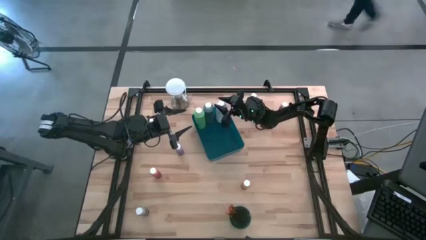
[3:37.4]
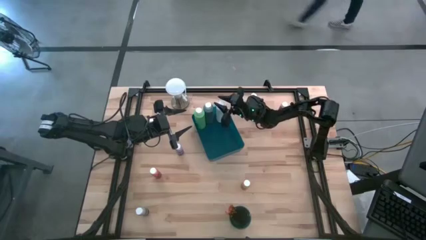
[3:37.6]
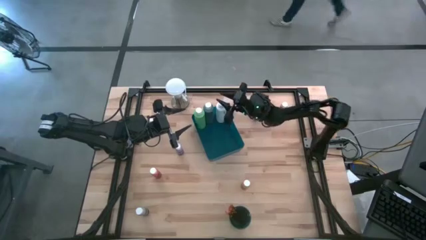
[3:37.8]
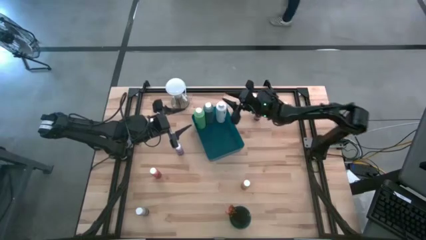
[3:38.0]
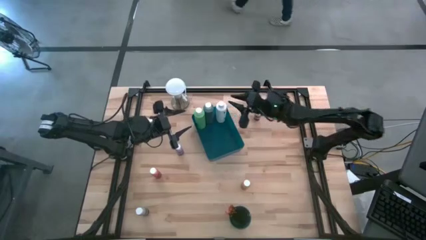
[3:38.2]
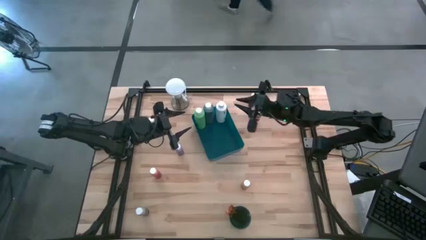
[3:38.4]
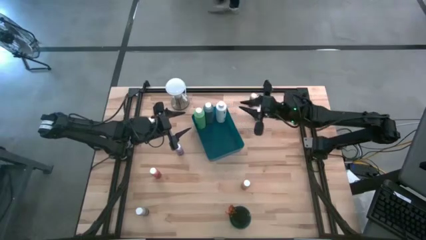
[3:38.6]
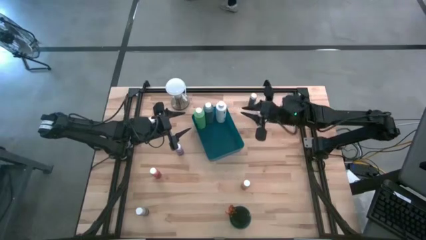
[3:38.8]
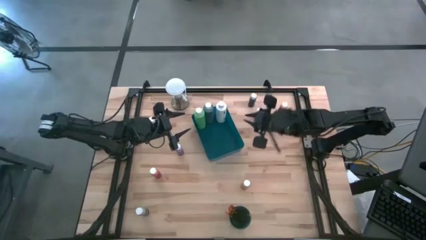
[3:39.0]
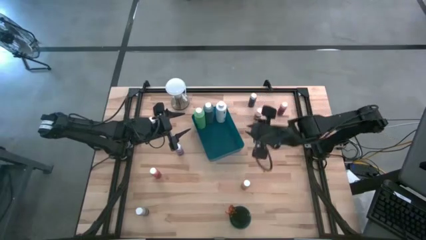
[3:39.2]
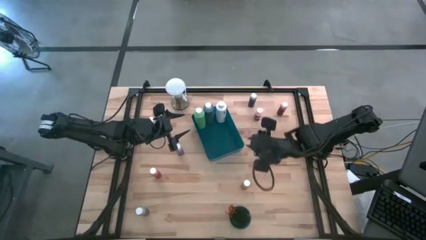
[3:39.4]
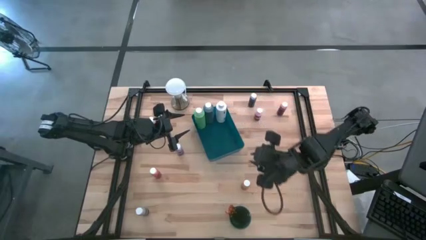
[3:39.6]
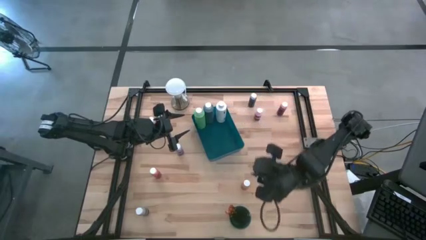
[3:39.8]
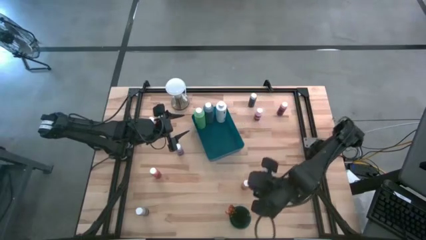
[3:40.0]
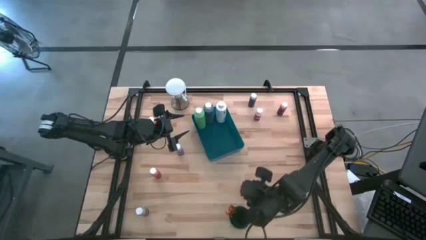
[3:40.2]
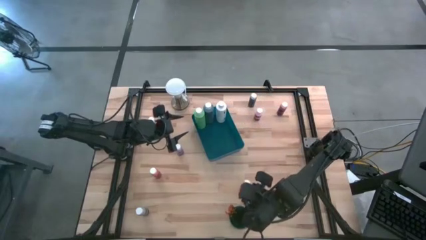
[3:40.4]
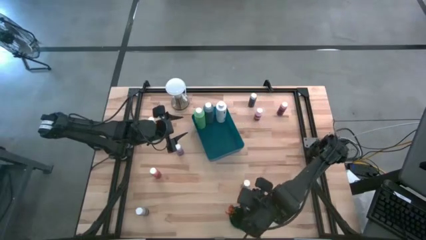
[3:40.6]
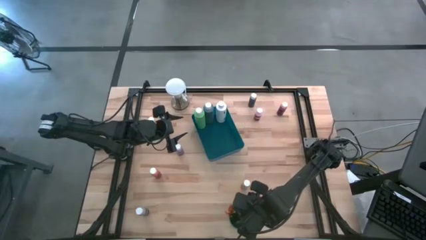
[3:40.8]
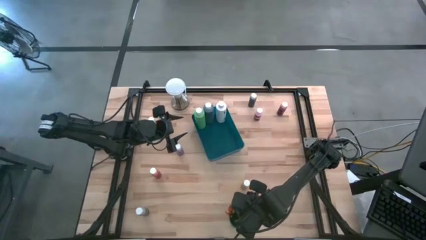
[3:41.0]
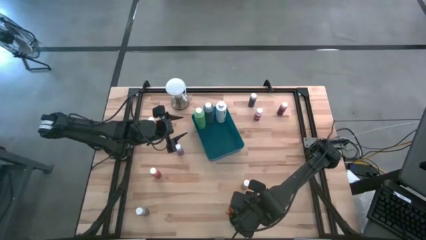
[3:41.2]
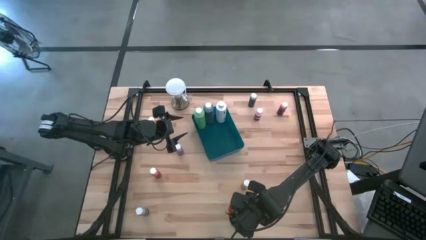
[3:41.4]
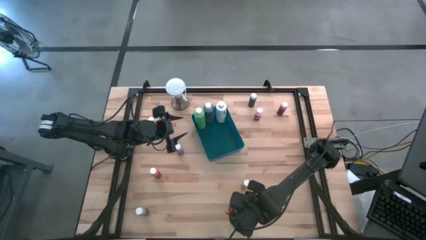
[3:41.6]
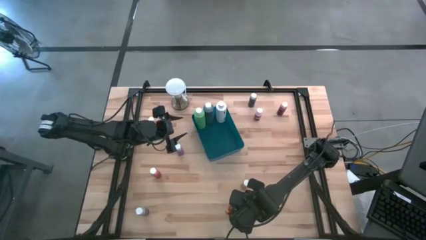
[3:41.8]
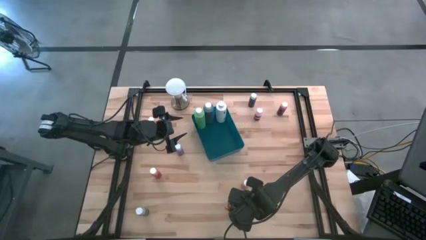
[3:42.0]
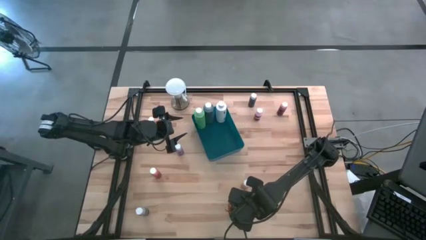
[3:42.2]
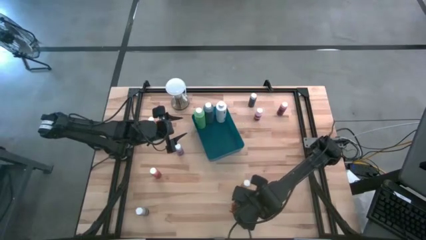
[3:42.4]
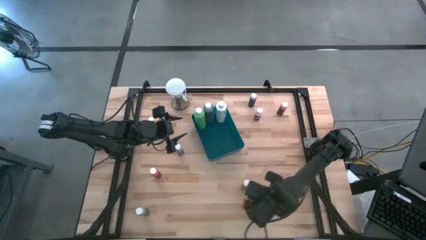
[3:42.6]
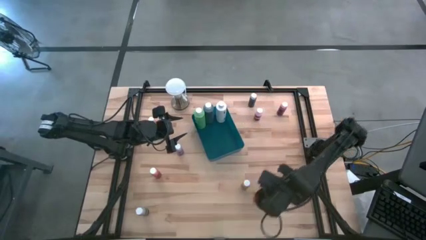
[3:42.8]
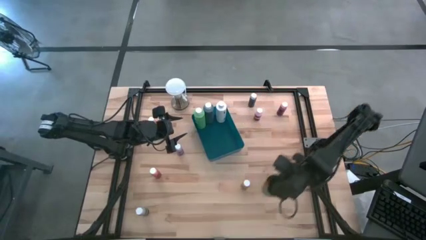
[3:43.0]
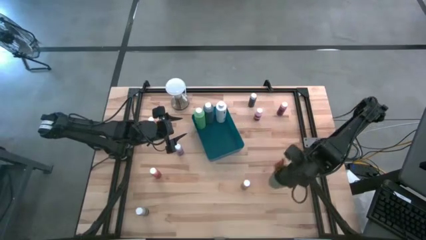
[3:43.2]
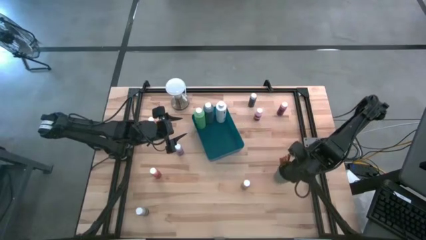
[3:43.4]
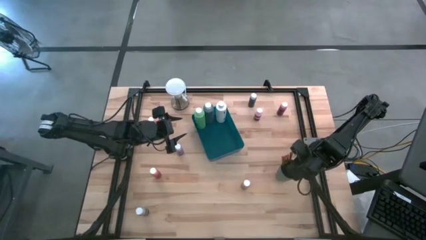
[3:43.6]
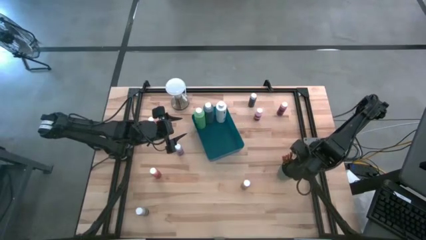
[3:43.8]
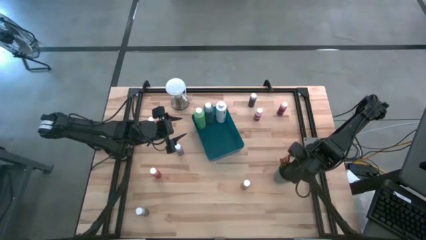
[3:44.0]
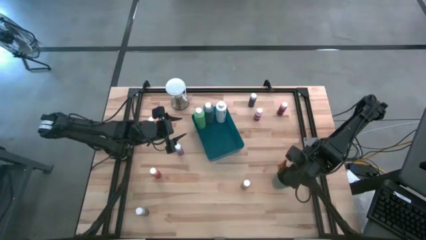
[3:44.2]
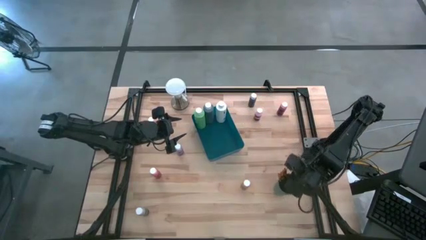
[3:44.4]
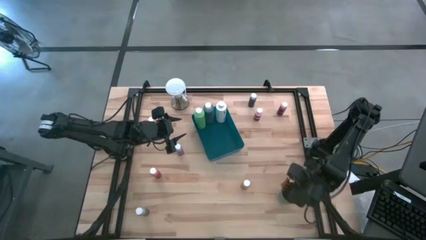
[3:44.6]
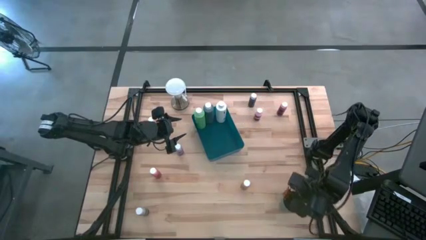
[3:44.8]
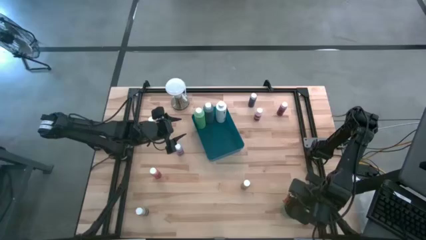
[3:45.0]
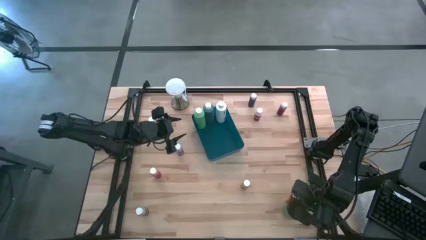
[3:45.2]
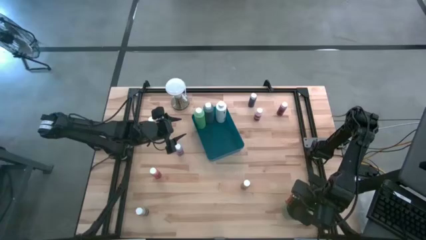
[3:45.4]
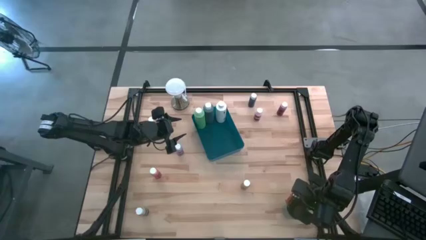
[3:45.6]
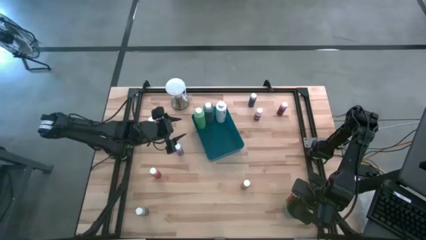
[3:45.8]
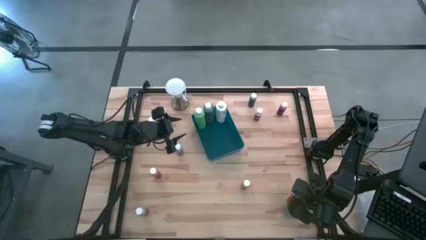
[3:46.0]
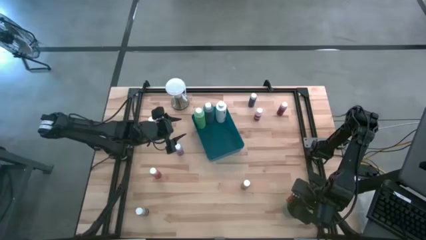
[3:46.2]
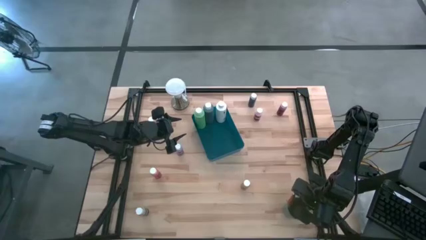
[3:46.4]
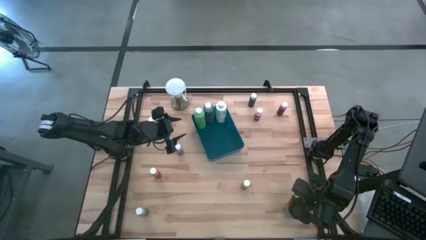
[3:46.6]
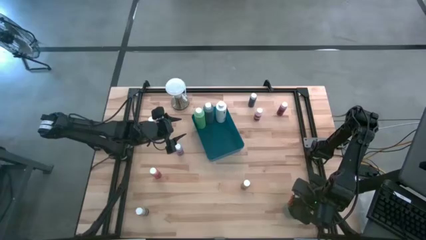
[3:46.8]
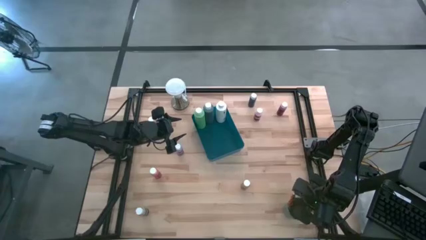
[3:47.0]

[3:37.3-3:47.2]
Task: Pick & Place Paint Supplies
Move the green cup to the bottom right of the table
